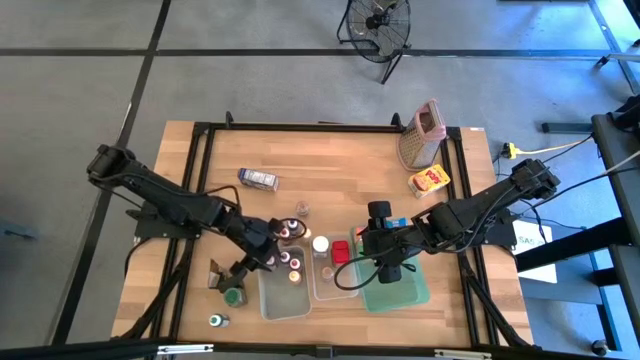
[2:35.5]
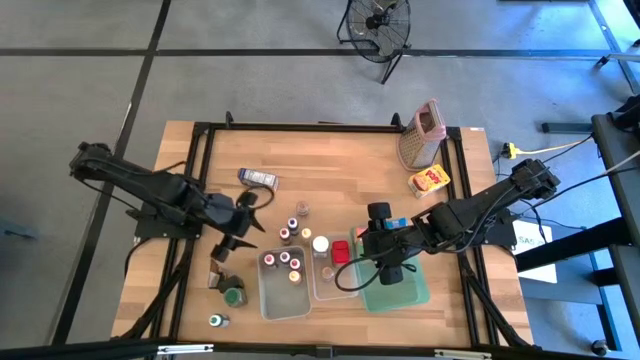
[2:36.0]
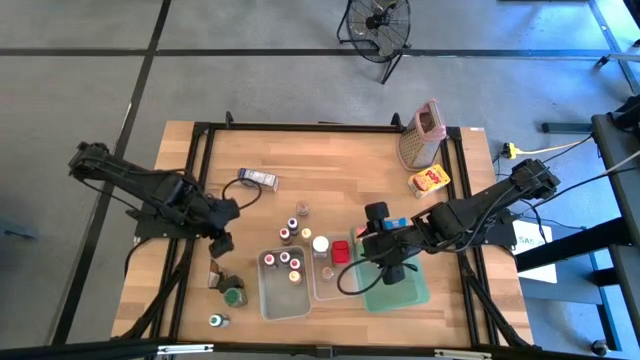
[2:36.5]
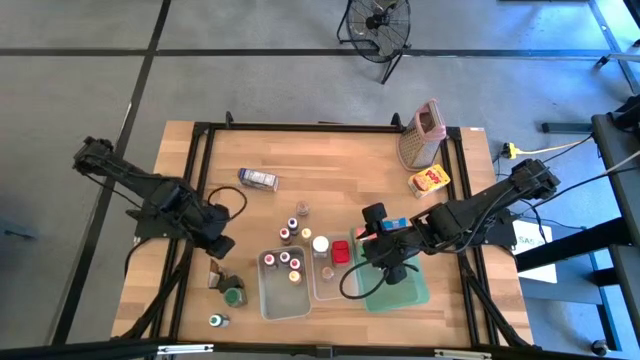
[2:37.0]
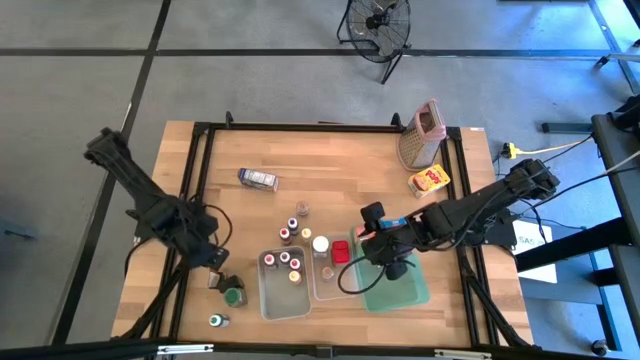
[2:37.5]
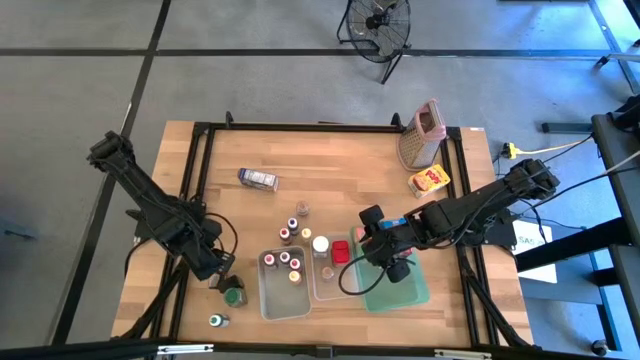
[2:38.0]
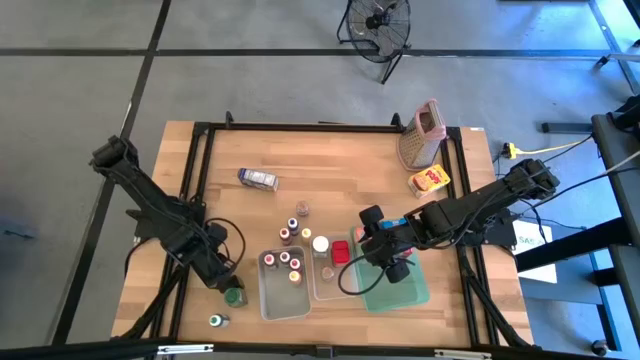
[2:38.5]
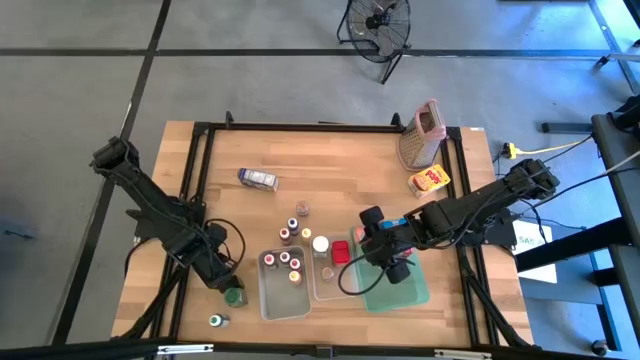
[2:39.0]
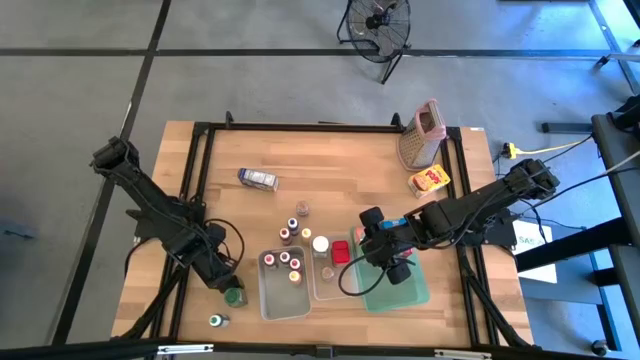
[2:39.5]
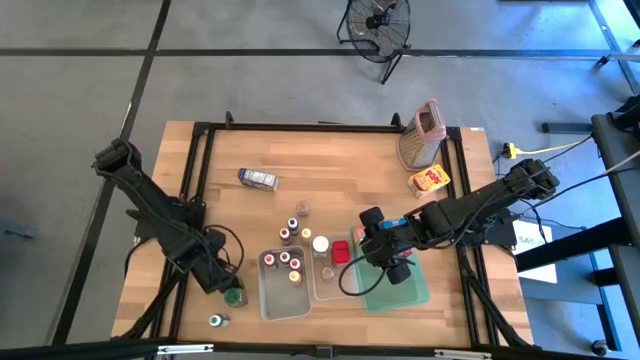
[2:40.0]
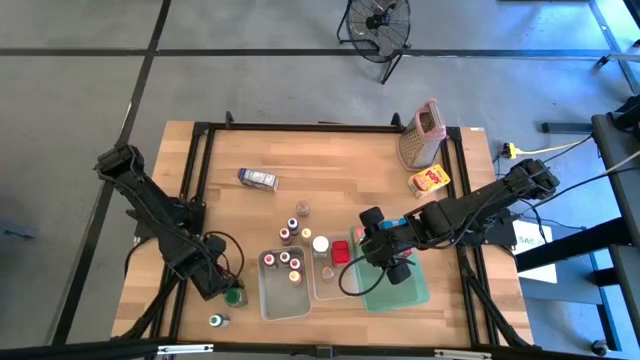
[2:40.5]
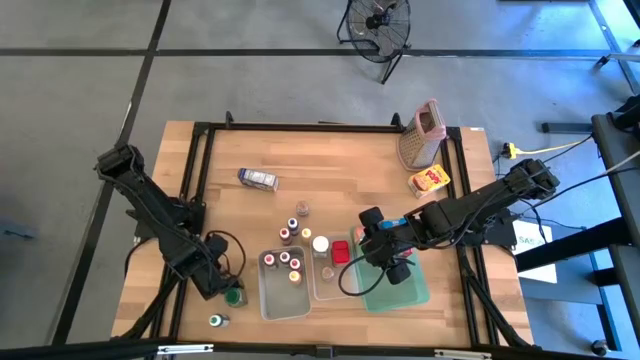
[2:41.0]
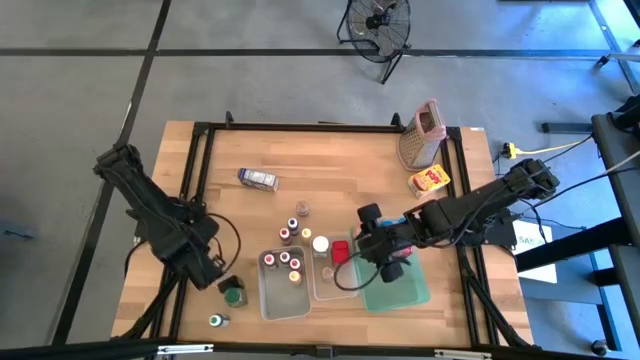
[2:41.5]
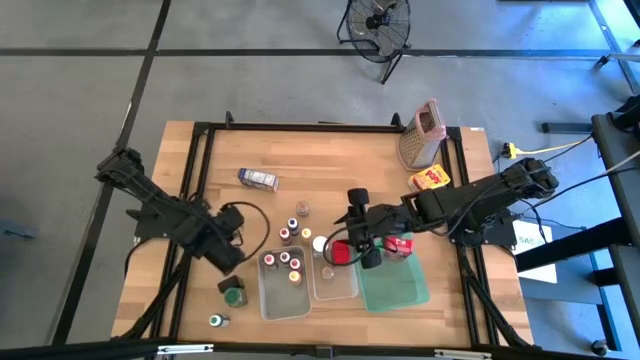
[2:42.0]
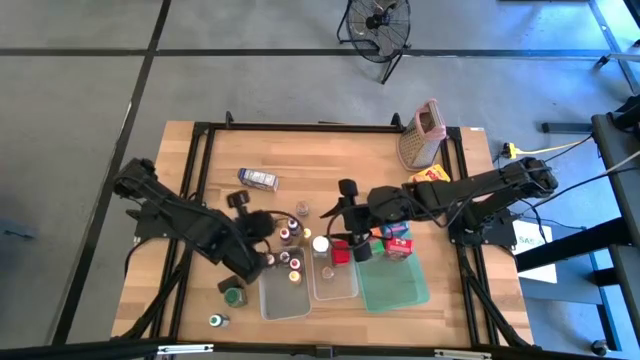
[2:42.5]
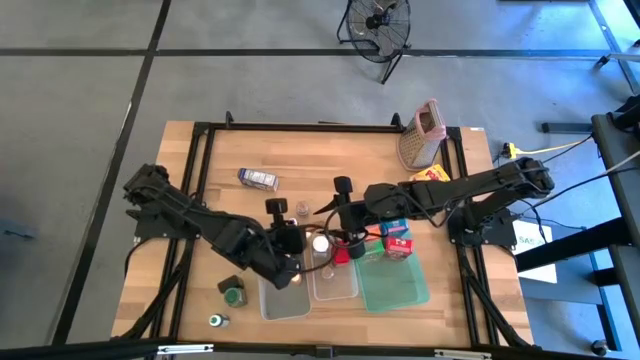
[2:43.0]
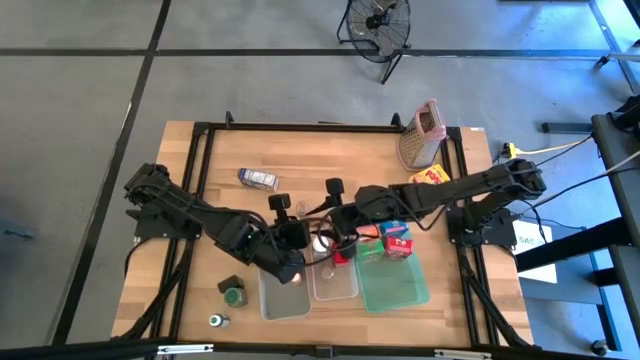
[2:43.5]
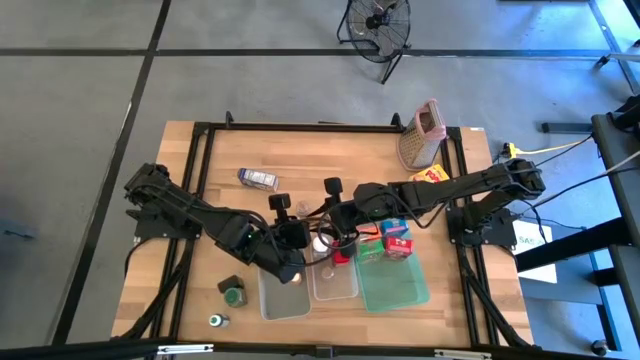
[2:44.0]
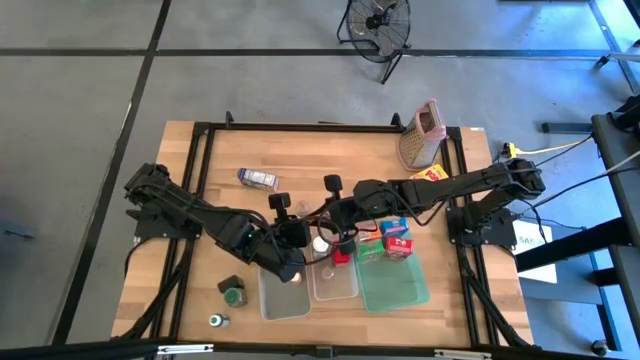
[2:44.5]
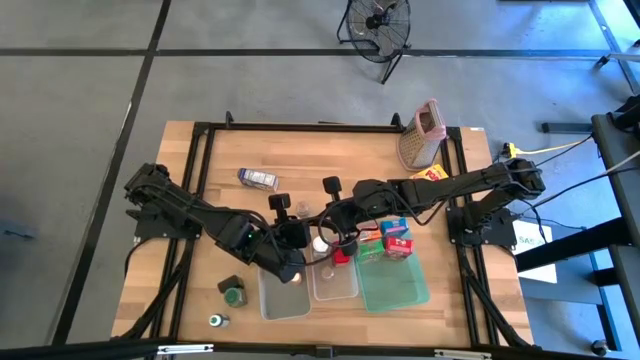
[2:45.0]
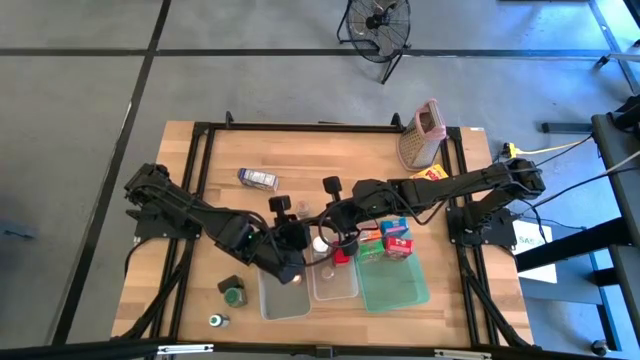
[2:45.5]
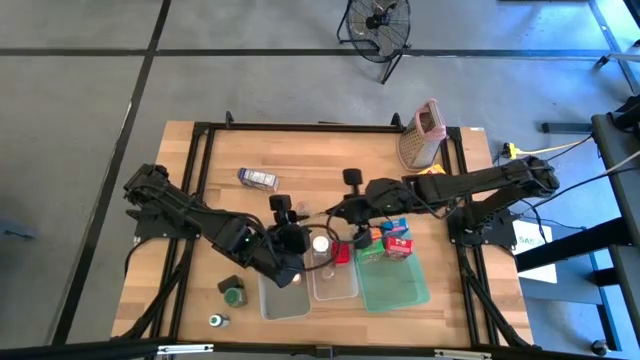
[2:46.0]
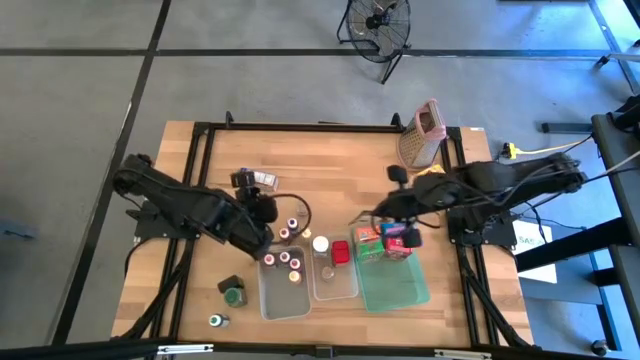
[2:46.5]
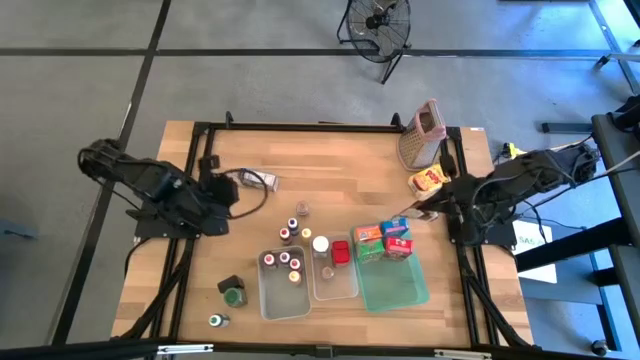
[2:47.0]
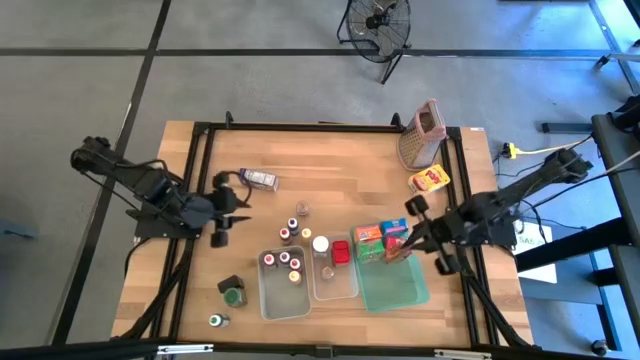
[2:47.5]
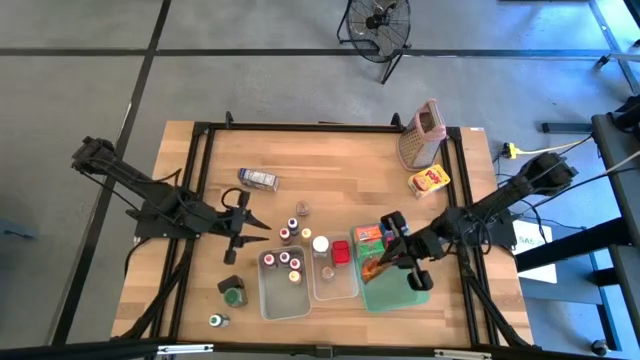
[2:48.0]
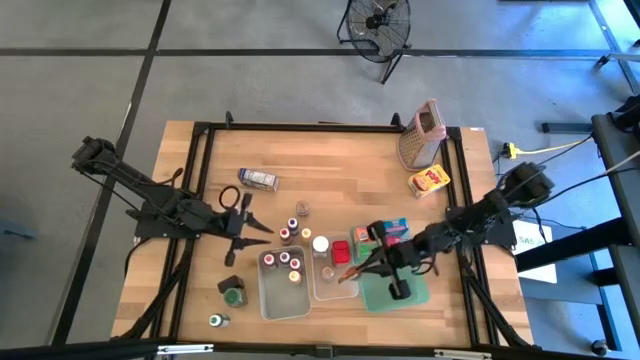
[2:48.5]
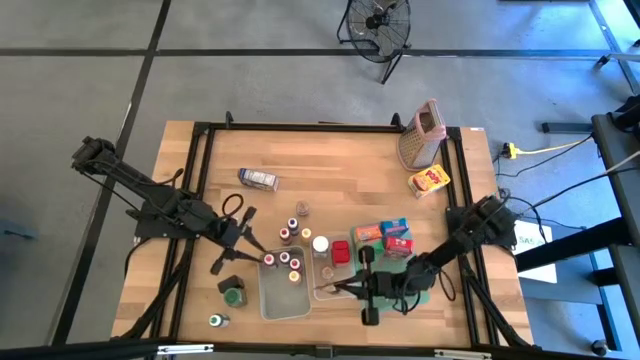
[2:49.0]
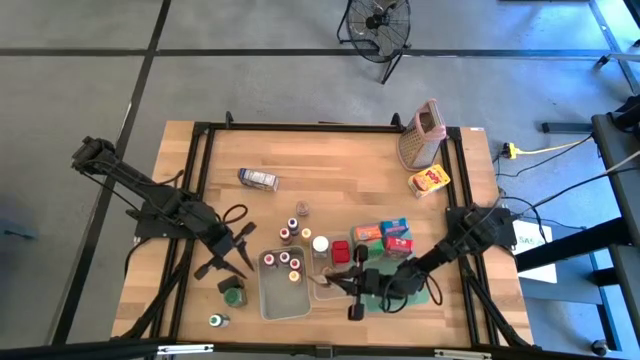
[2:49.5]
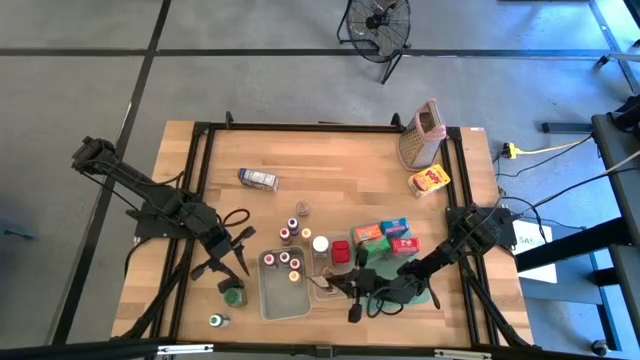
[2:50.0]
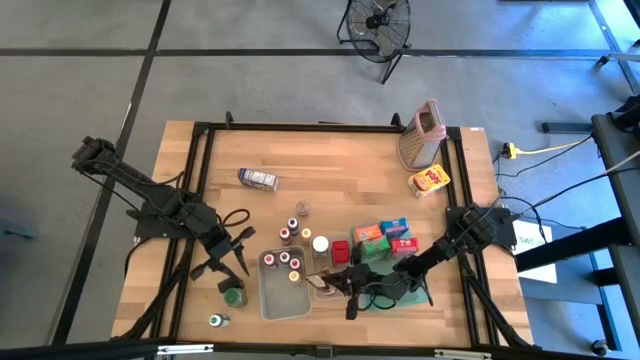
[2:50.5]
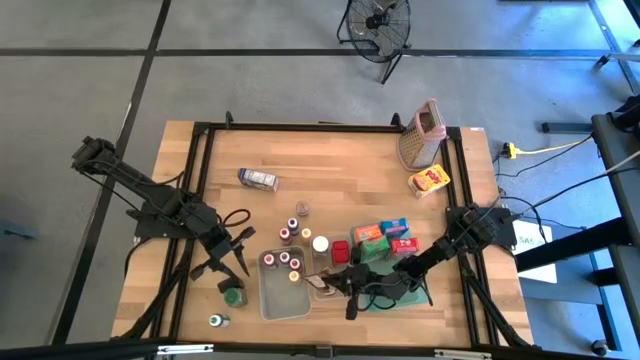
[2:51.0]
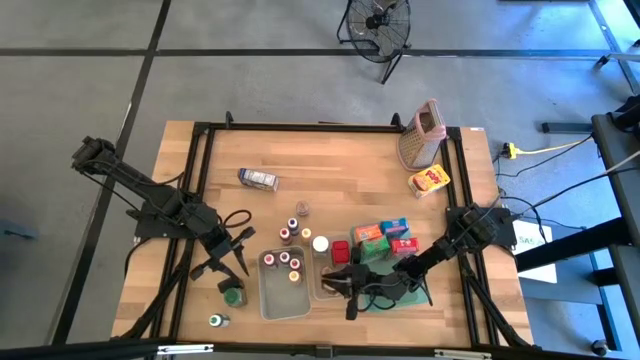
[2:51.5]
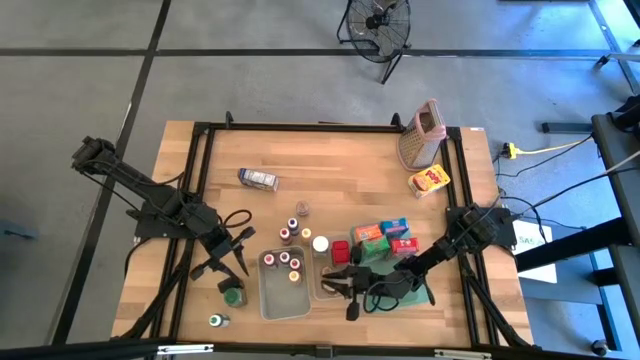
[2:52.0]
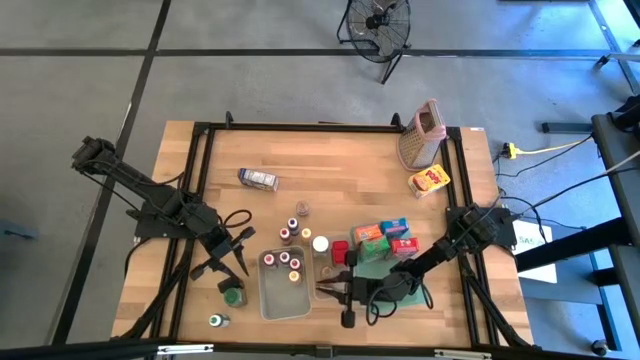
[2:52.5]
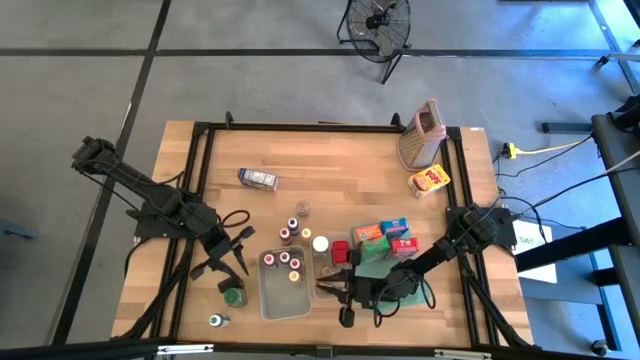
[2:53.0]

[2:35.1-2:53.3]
Task: Pick & Place Kitchen Items
Put the orange seasoning pack into the white bin

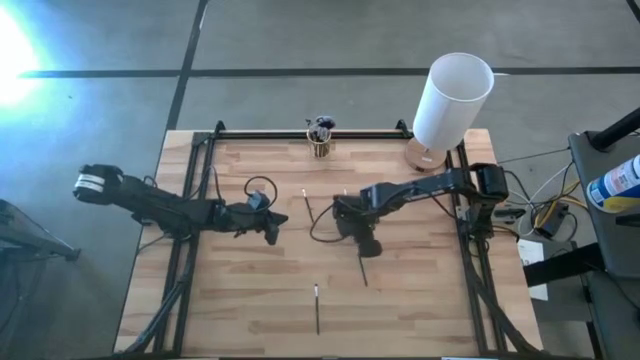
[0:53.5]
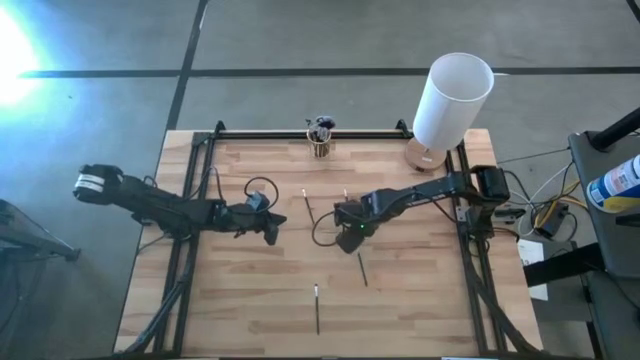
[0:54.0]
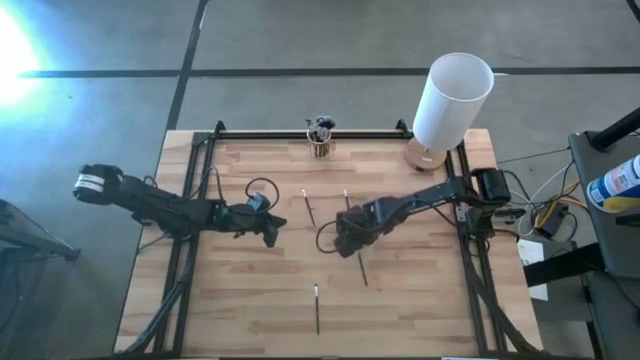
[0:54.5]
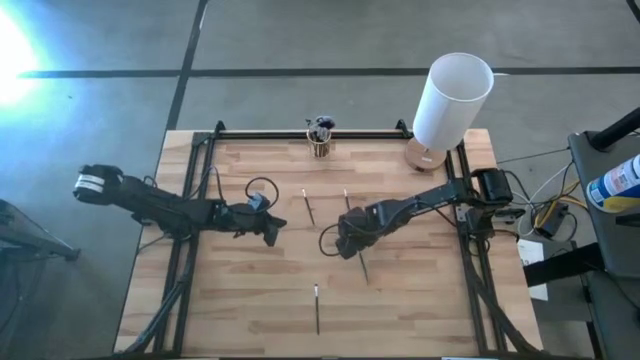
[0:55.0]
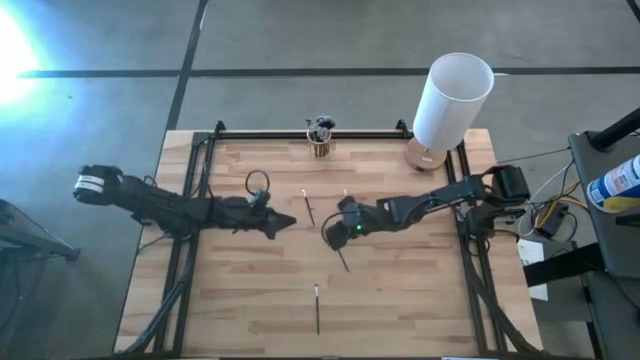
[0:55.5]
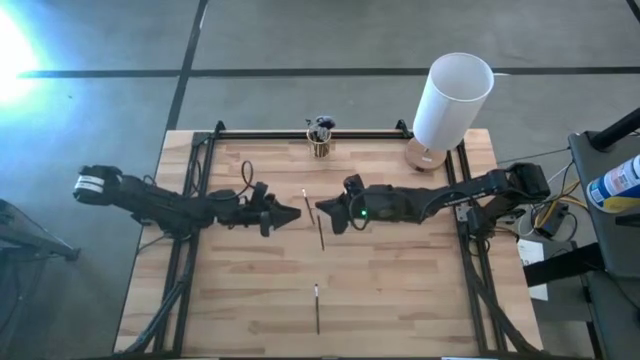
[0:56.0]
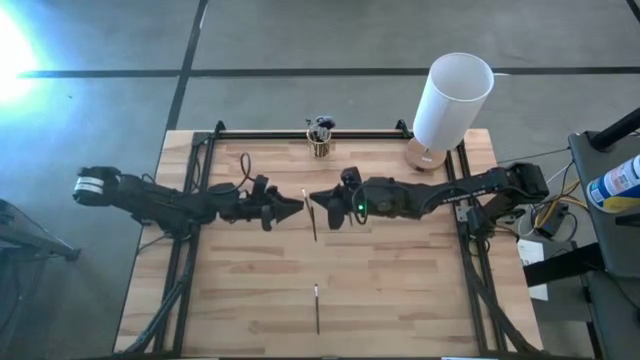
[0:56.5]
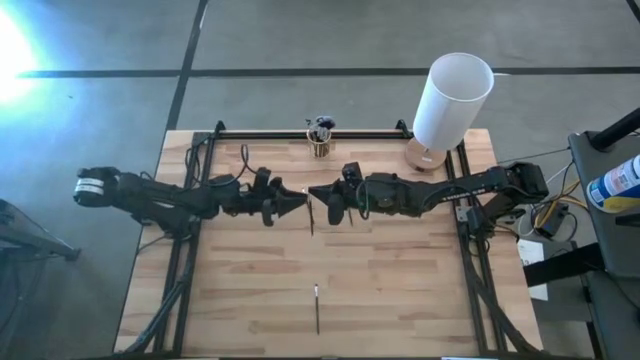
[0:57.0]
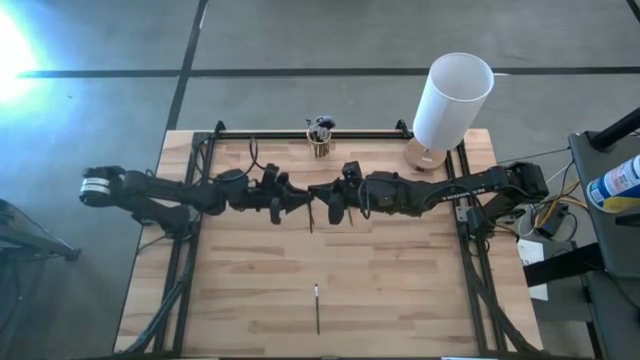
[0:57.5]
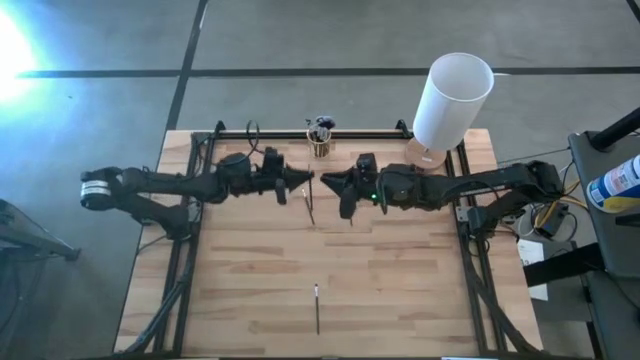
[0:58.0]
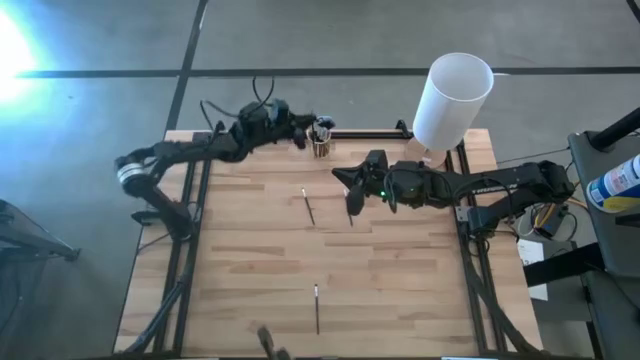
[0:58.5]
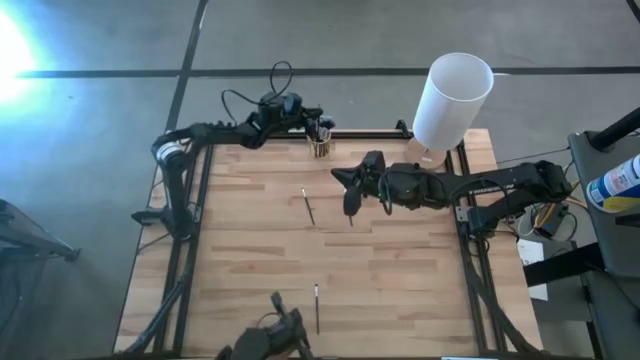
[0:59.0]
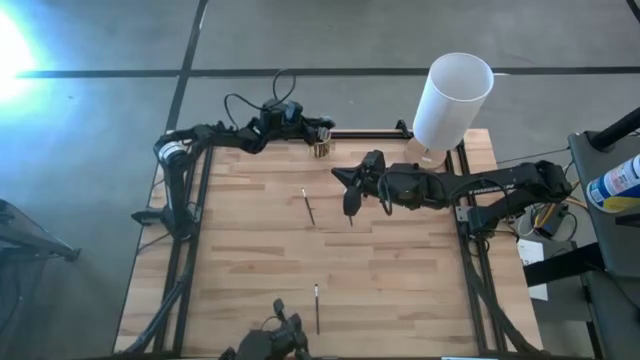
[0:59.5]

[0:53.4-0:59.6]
Task: Put items in baskets/containers
Put the black eyeshadow brush into the yellow pen holder
